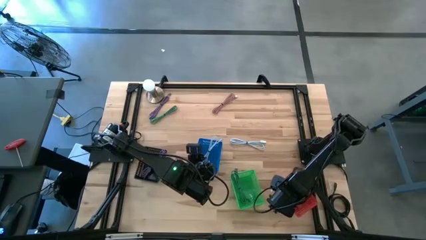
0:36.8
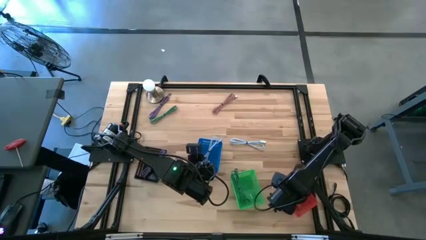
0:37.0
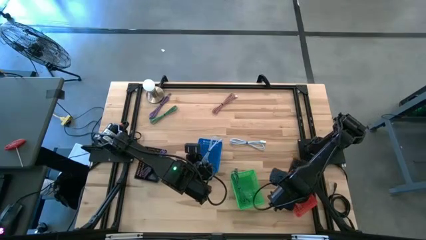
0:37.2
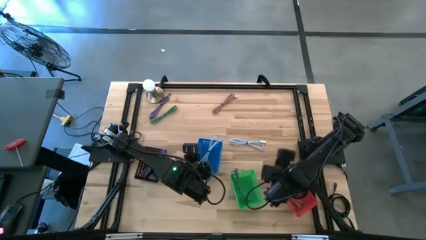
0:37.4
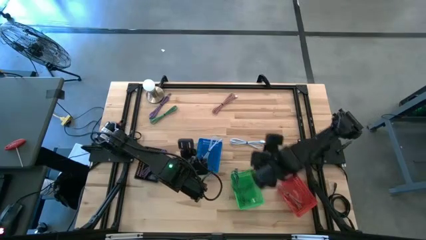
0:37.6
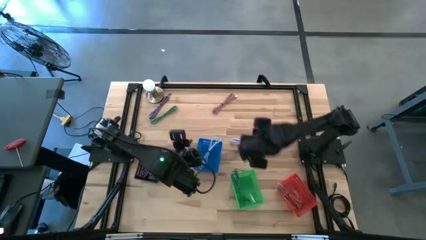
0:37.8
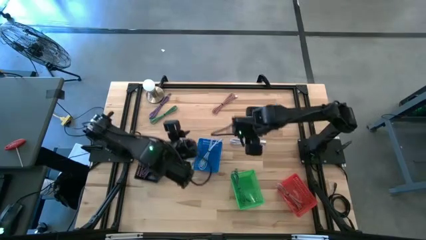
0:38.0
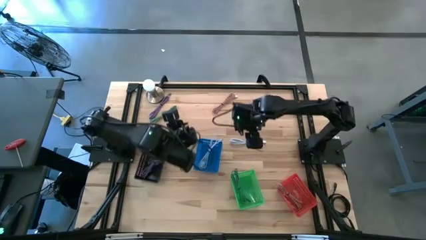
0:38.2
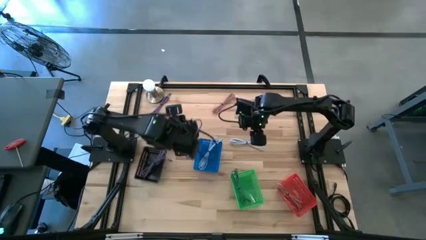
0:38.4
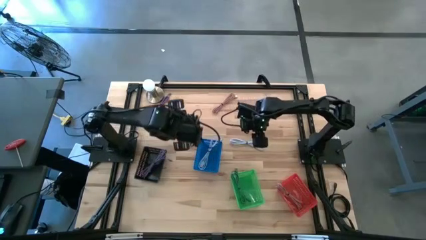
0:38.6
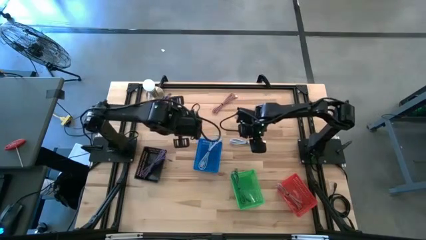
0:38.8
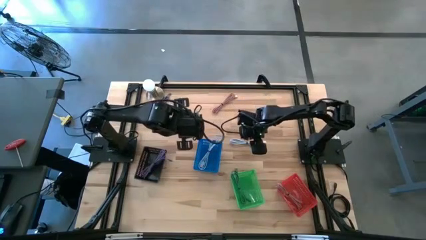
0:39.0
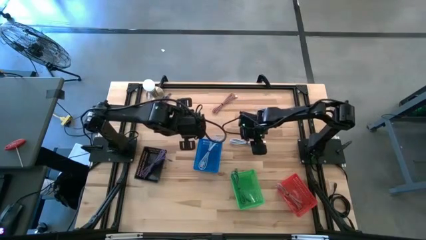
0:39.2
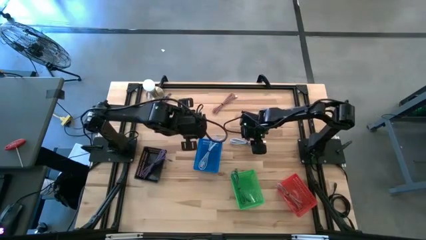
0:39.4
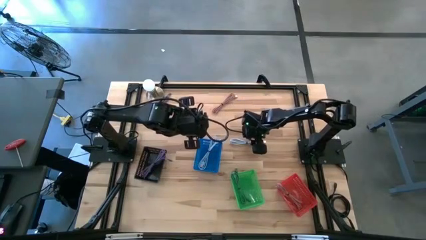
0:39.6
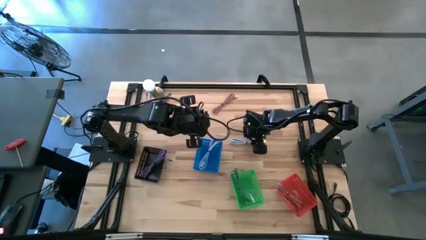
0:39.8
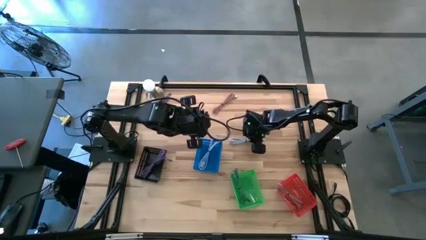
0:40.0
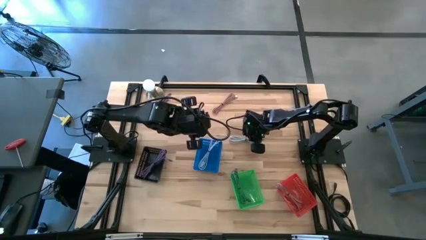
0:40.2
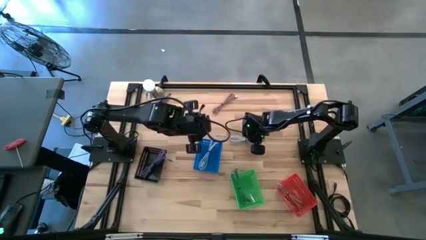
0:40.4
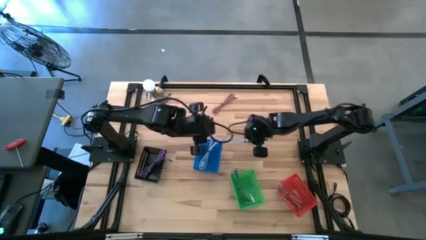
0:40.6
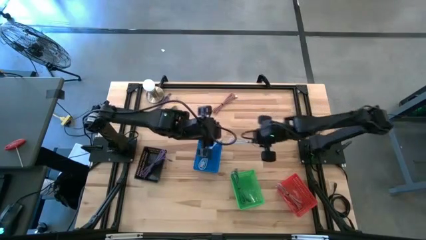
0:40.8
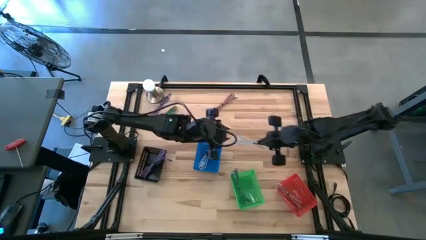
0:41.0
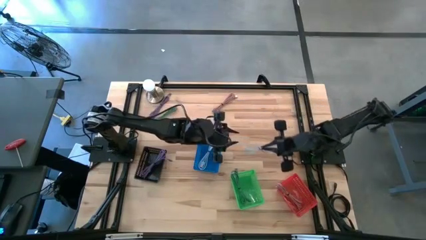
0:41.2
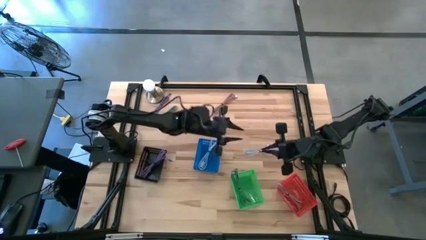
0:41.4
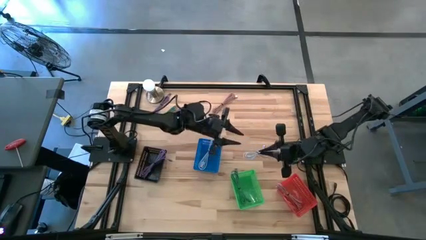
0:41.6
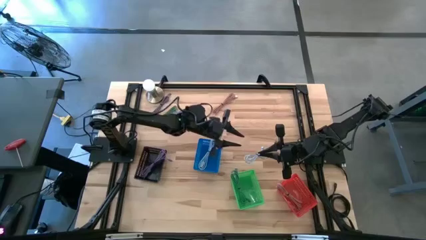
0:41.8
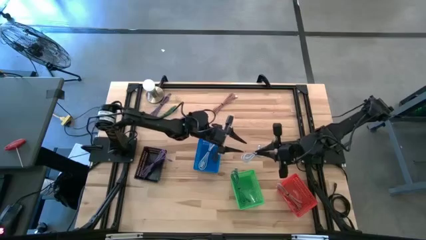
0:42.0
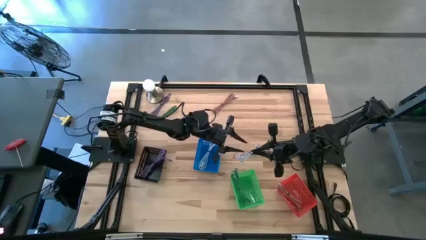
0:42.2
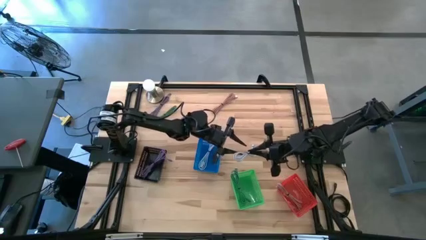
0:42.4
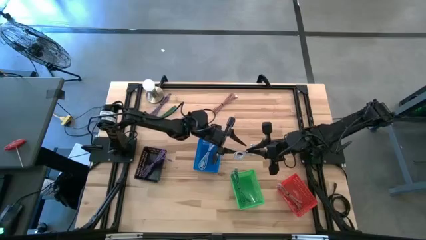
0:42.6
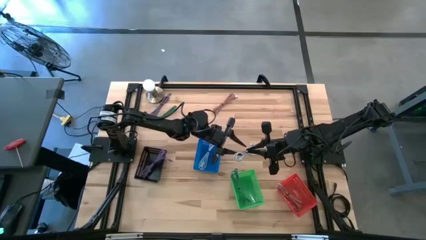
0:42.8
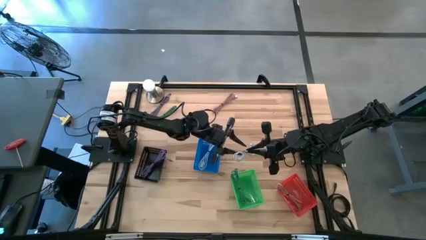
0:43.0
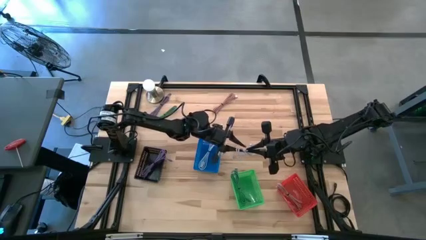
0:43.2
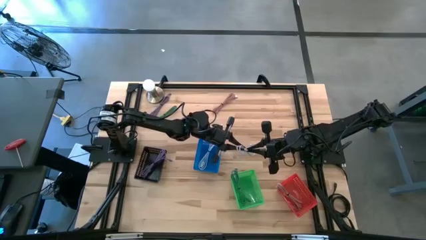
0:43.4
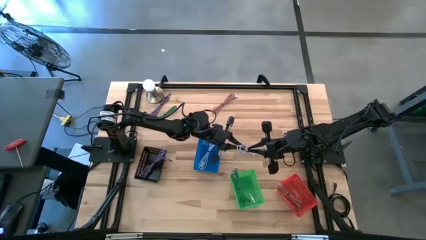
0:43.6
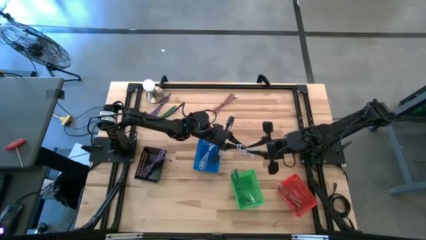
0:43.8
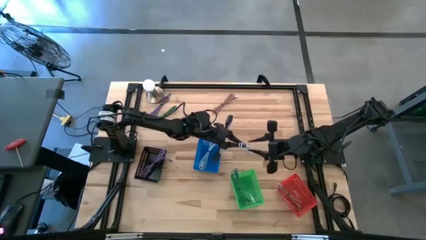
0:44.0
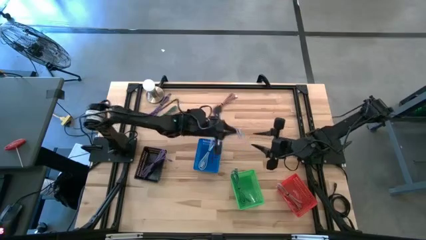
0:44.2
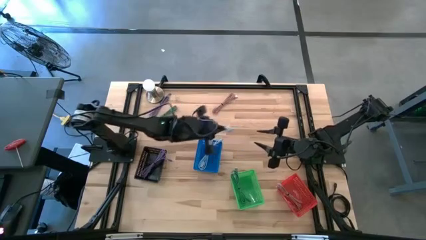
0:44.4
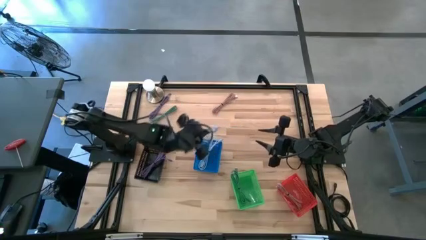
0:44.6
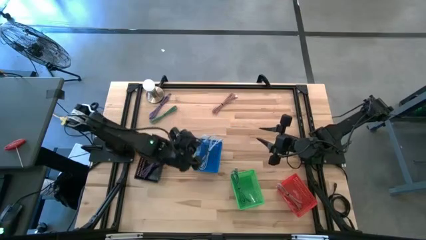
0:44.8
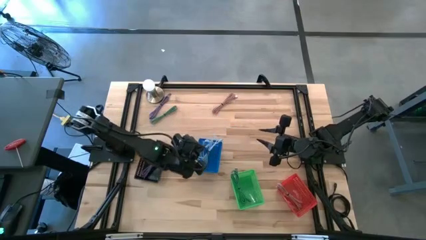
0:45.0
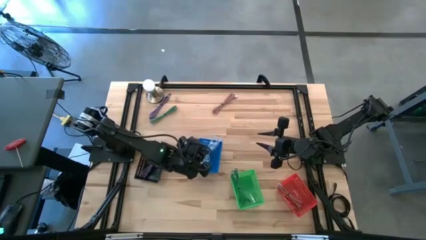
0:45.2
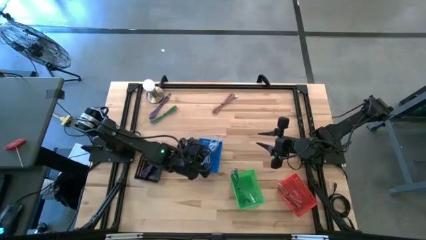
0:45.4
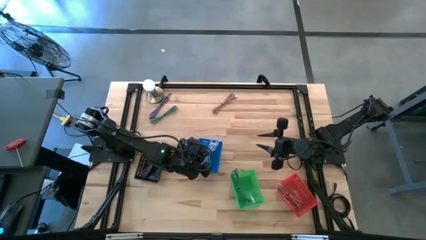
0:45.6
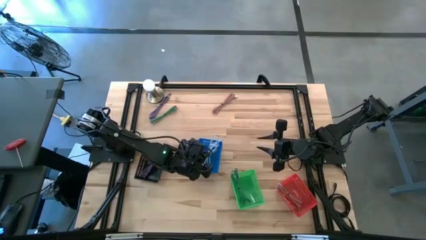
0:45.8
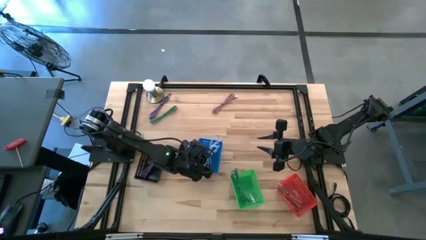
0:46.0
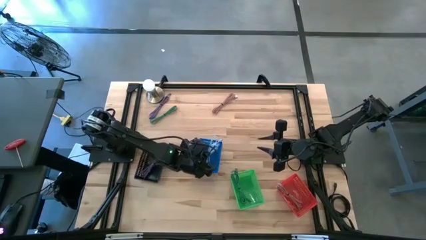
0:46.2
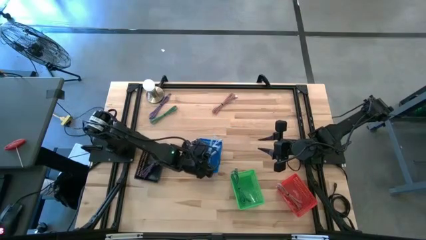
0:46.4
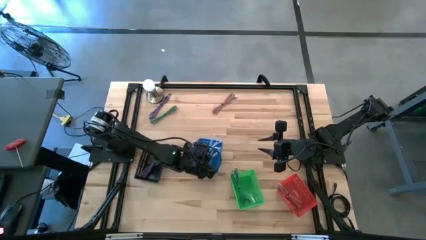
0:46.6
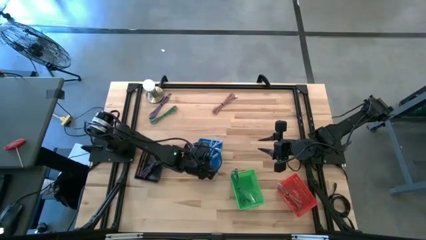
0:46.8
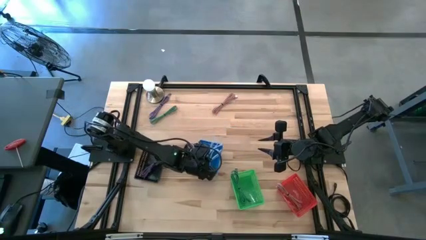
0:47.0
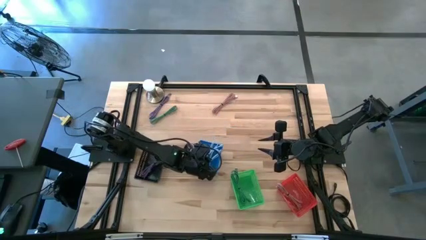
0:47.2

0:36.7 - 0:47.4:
Task: Pick & Place USB Port
Put the light blue USB cable into the blue bin
